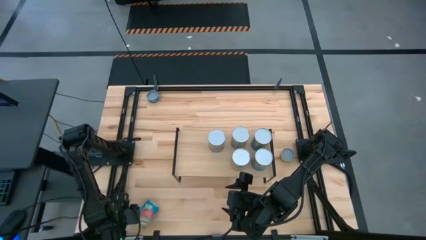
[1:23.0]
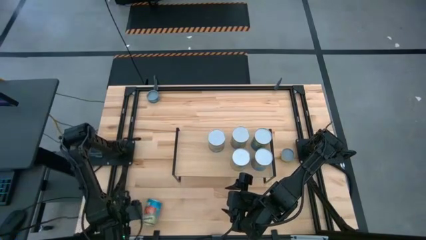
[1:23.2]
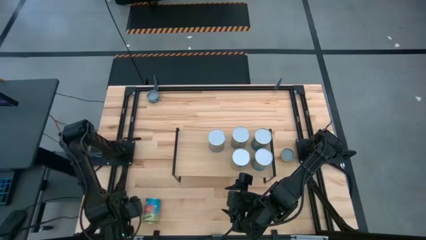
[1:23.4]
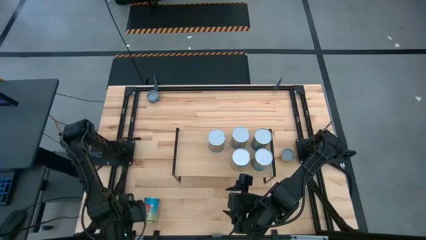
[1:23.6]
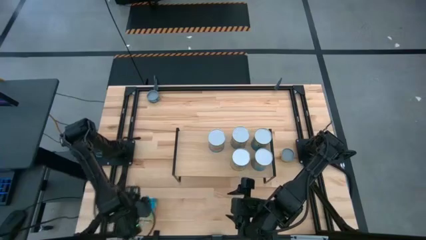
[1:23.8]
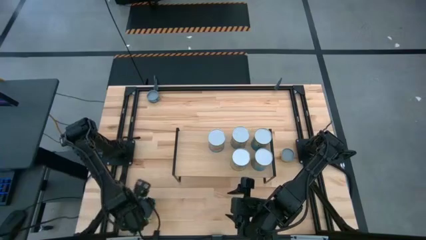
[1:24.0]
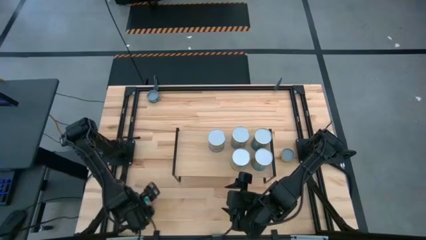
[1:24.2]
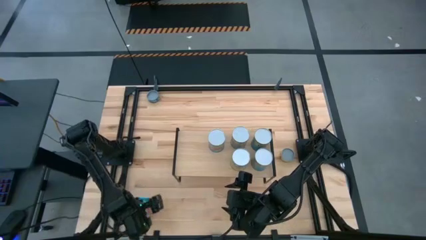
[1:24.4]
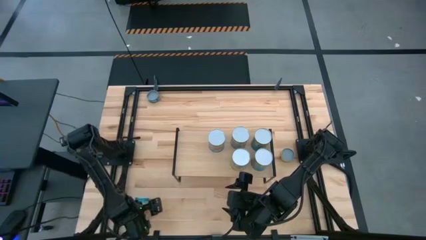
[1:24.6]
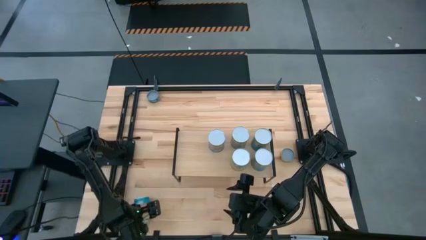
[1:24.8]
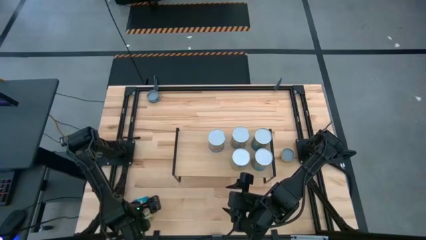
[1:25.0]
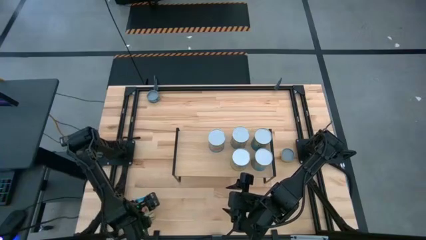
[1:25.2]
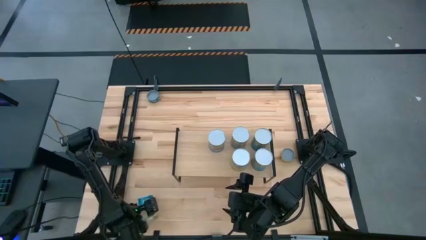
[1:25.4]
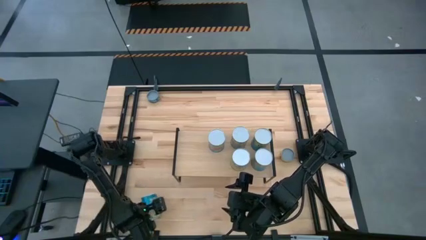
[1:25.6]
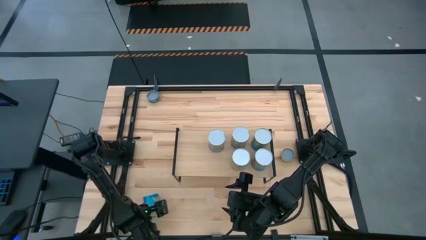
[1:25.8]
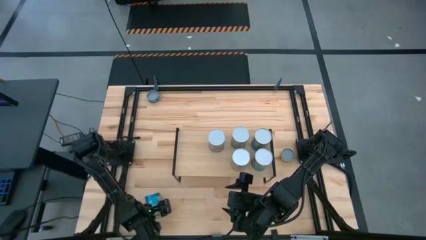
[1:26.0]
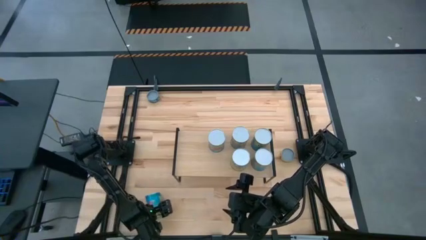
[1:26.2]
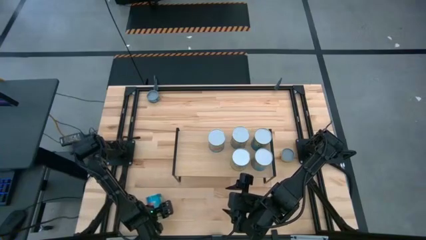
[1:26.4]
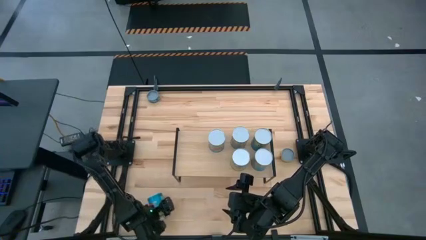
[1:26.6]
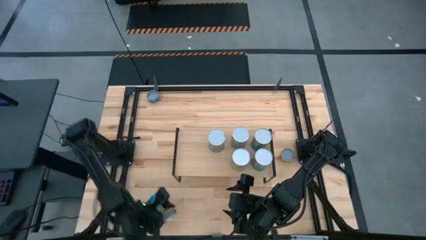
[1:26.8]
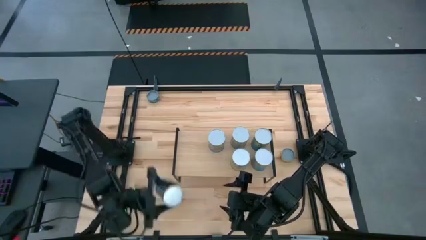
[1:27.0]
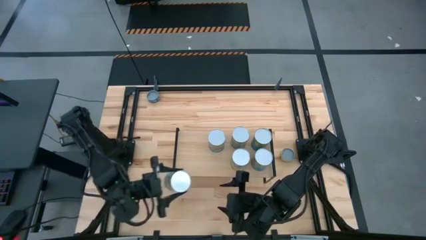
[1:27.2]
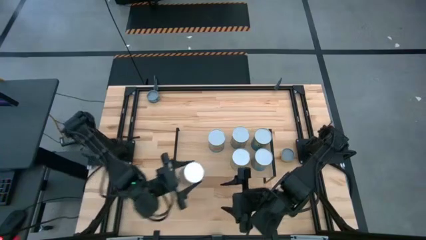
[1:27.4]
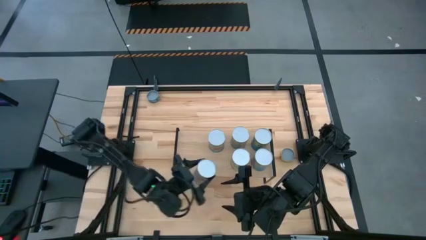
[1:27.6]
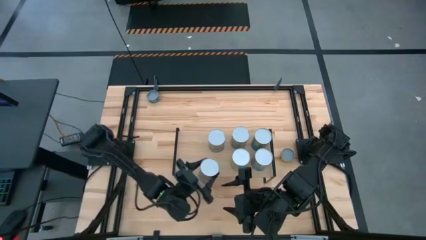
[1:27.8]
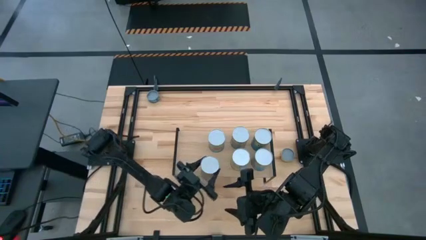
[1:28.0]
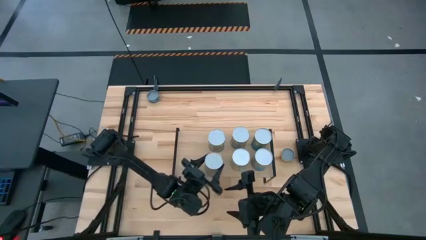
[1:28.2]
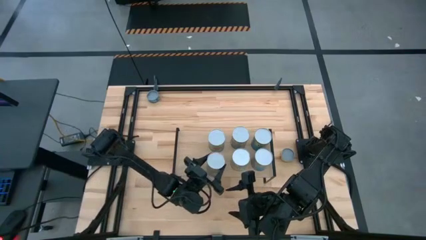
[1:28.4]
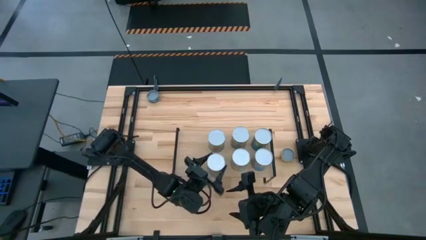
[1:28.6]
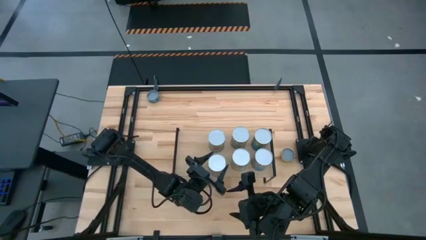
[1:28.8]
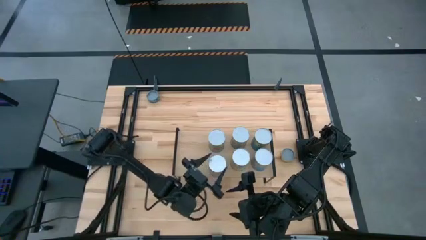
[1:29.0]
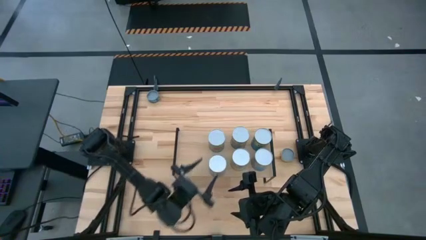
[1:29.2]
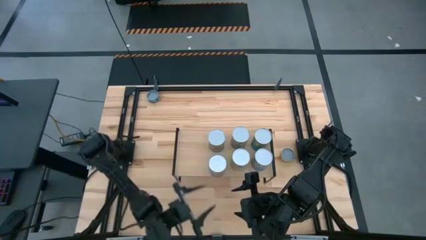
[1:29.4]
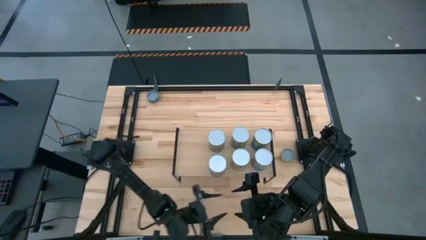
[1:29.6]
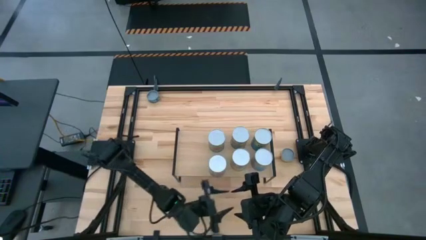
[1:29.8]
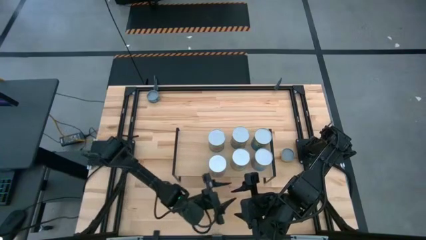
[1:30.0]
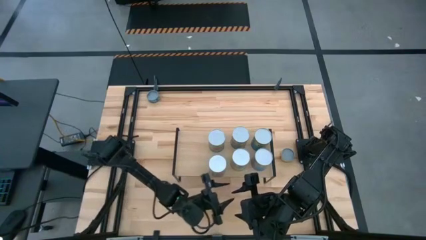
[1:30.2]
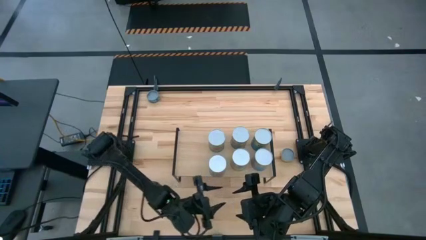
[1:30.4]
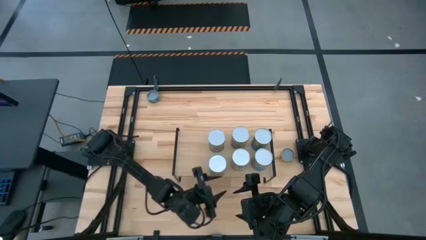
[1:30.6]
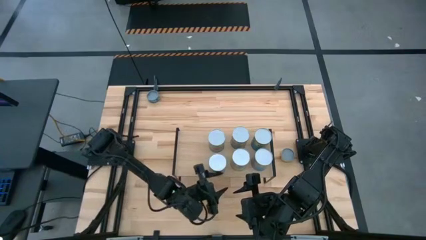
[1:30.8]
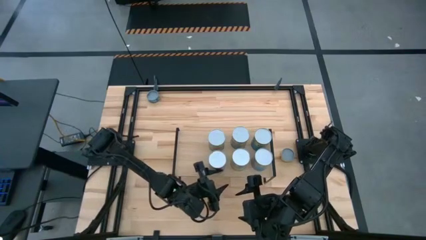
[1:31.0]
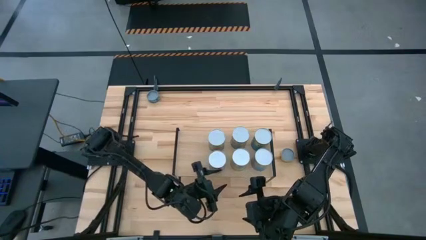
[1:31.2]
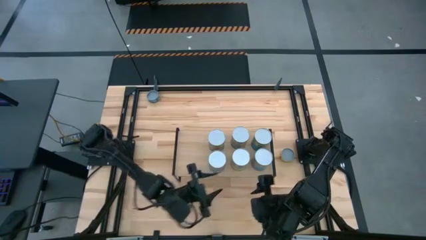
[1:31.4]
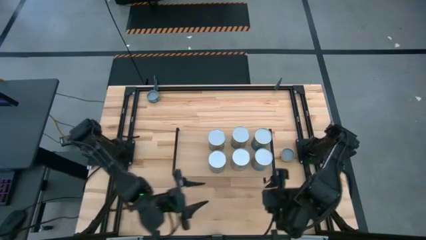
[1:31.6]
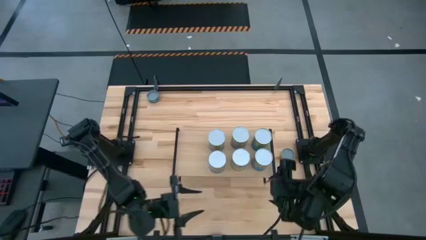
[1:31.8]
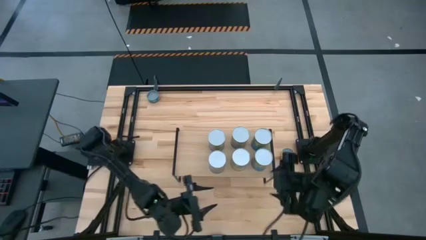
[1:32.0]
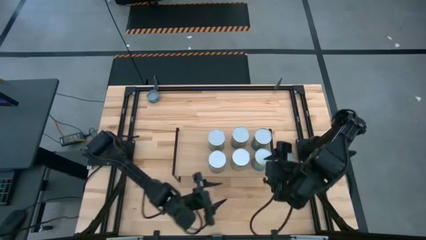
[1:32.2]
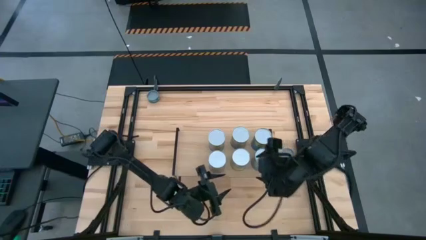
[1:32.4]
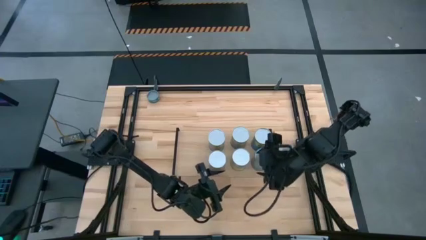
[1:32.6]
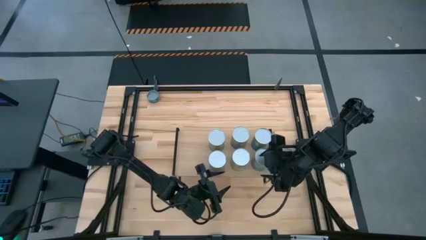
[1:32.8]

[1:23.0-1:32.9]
Task: Pick and place cans onto a shelf
Put the canned tomatoes on the shelf aligned with the other canned tomatoes

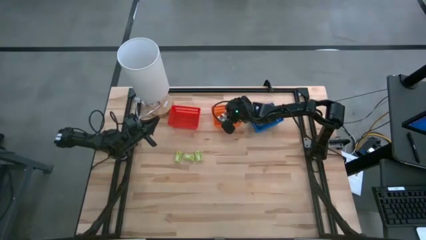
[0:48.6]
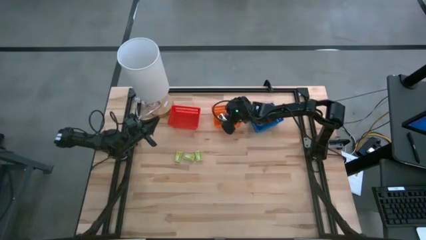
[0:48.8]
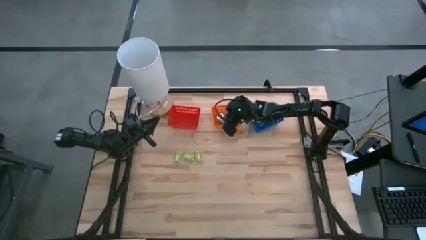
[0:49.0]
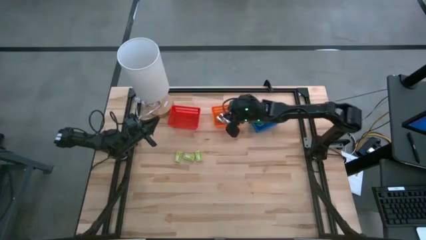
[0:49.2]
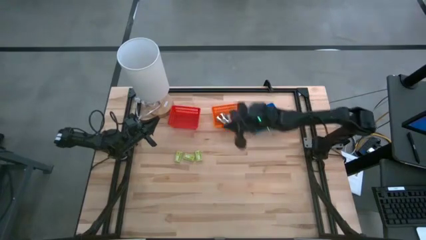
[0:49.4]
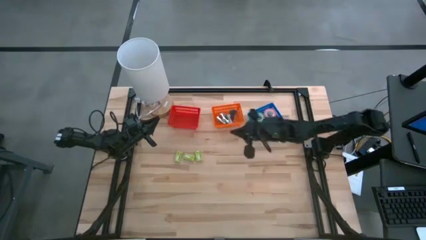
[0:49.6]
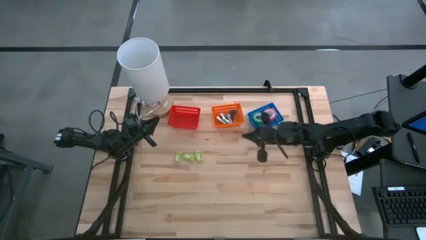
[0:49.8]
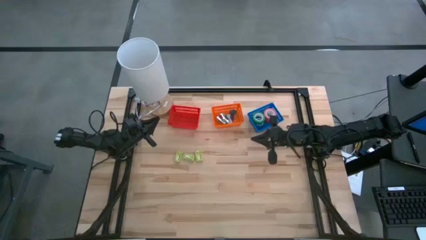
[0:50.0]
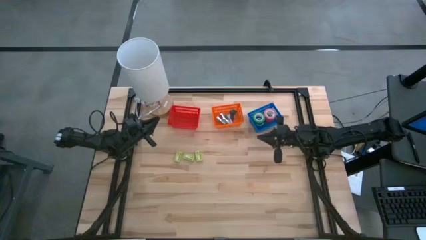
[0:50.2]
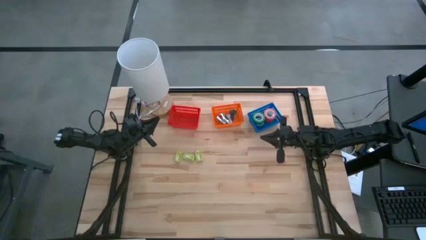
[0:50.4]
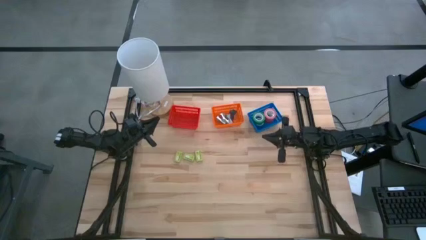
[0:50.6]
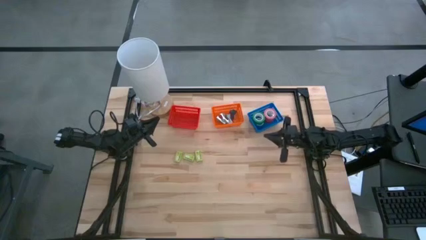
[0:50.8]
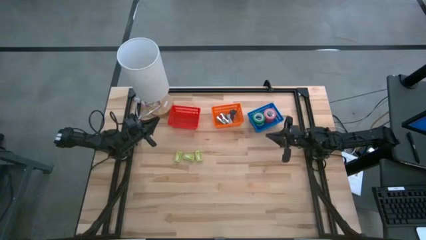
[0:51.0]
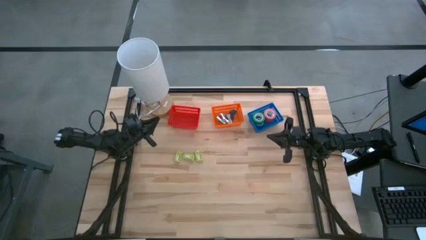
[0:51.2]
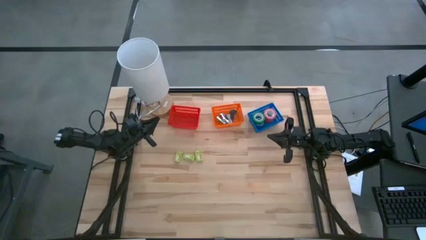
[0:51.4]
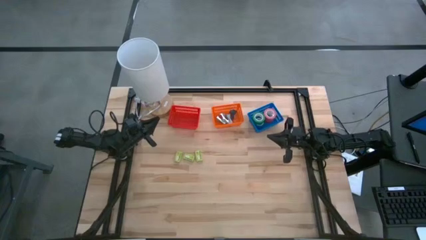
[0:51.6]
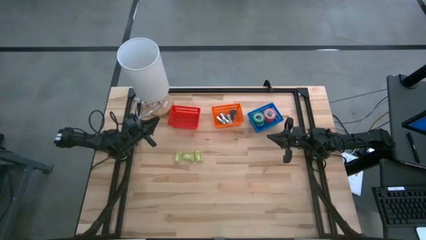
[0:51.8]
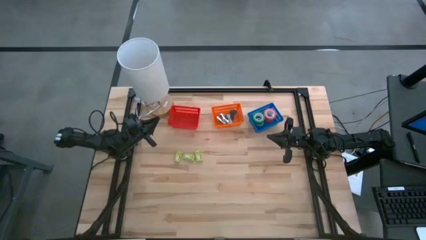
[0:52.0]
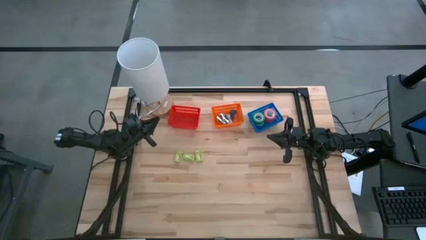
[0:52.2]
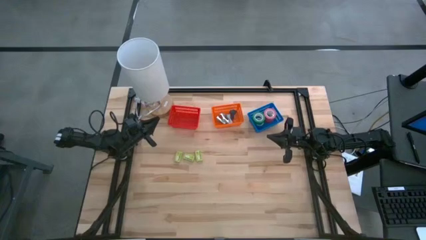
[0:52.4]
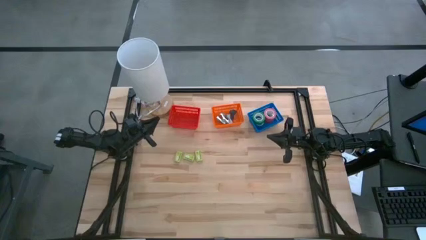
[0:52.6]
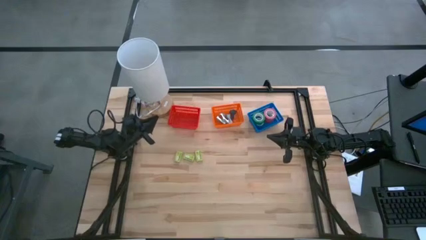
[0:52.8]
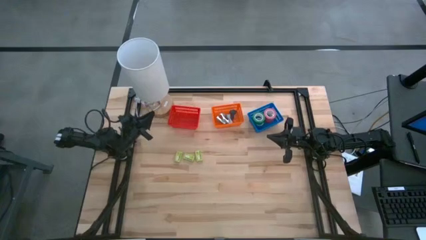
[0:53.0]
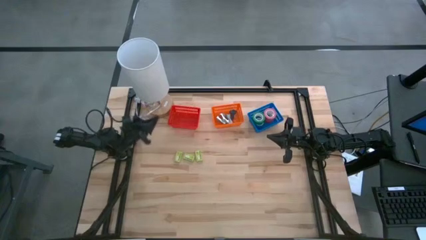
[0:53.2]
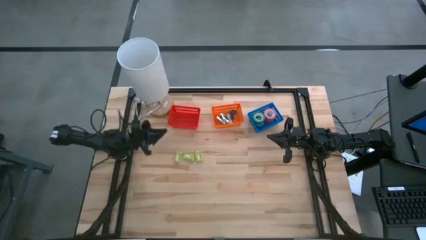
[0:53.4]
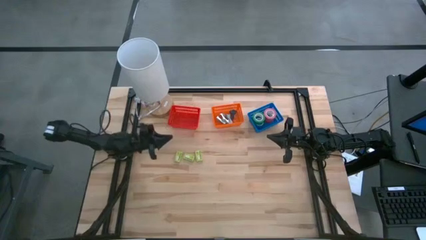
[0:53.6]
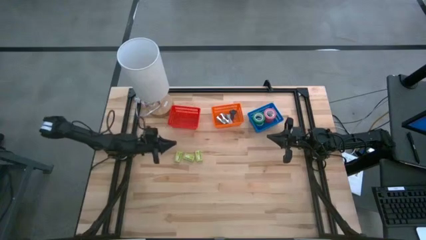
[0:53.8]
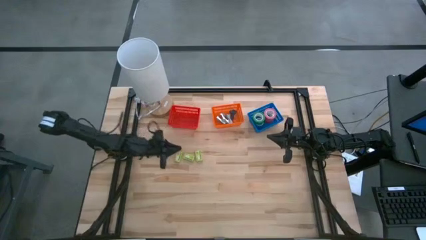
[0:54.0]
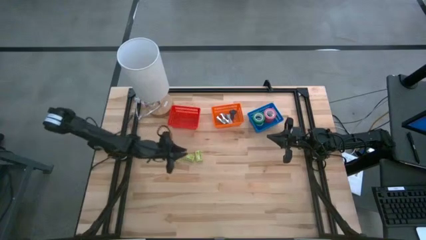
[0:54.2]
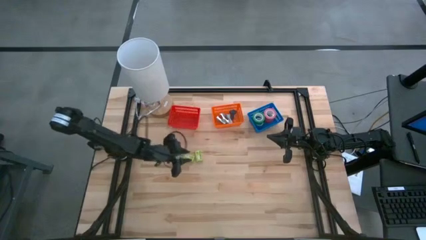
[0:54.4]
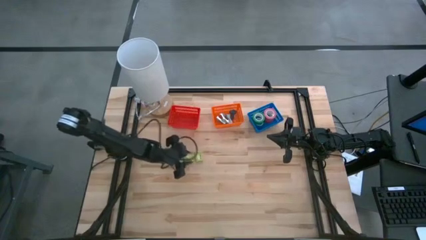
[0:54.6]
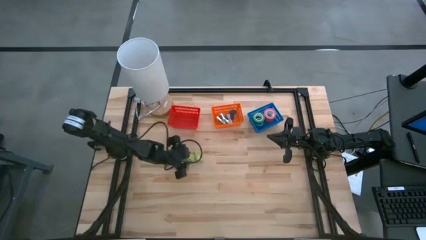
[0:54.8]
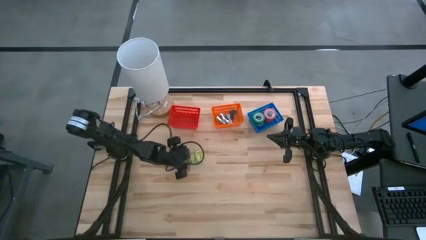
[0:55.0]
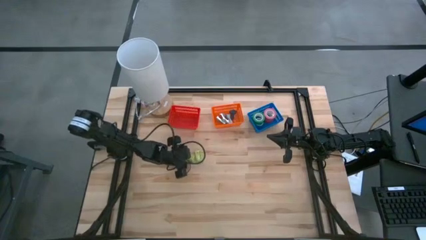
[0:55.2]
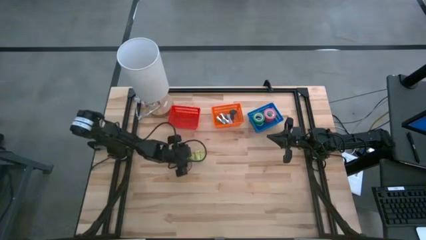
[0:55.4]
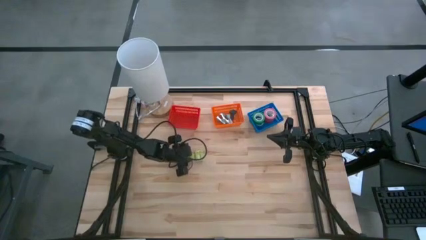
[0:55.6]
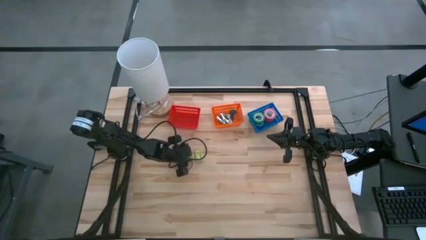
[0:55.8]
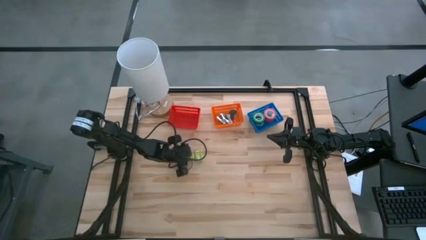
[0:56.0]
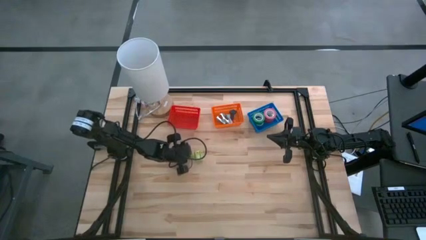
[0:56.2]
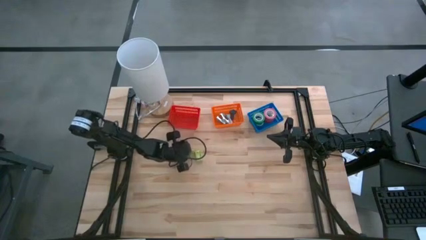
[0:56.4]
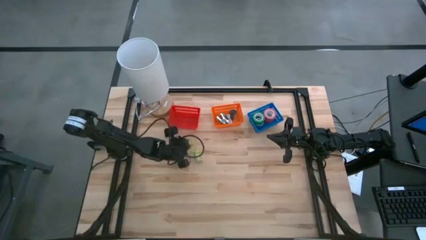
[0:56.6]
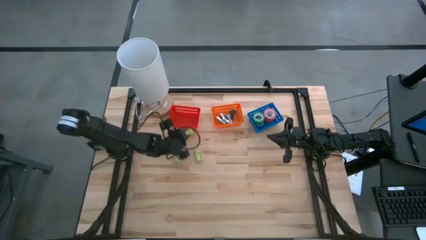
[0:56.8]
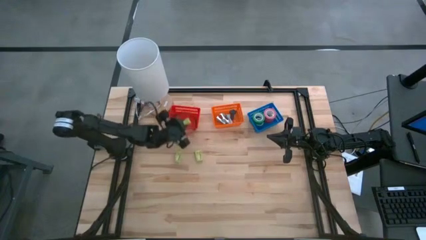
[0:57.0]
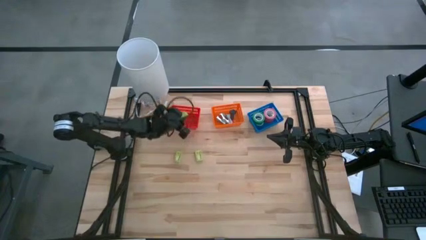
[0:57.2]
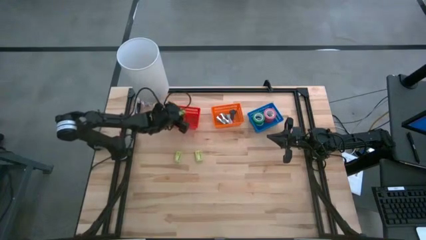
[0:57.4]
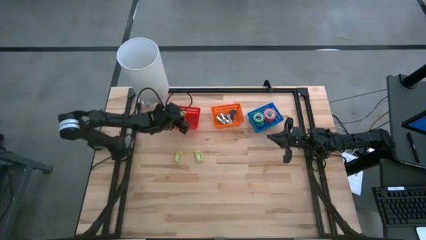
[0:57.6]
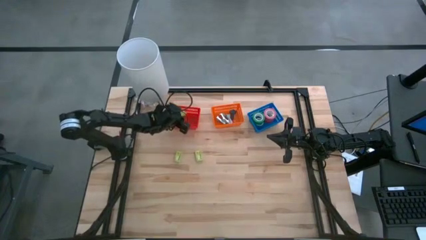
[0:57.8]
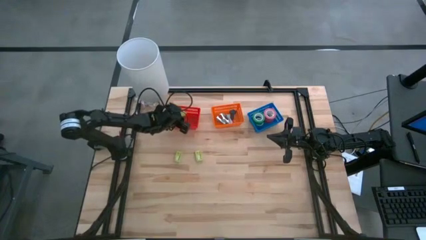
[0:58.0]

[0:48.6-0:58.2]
Task: Pick and place Stapler, Stapler remover, tape
Put the middle green staple box into the red bin
